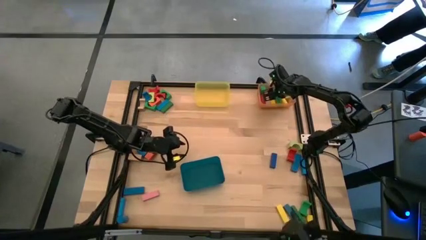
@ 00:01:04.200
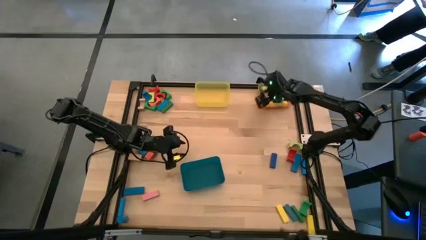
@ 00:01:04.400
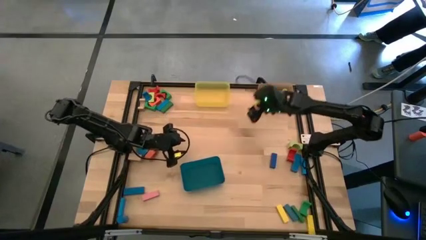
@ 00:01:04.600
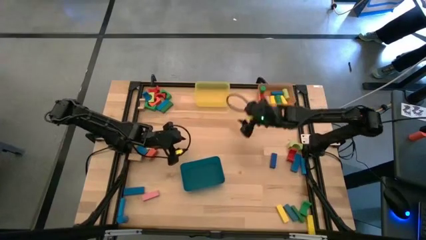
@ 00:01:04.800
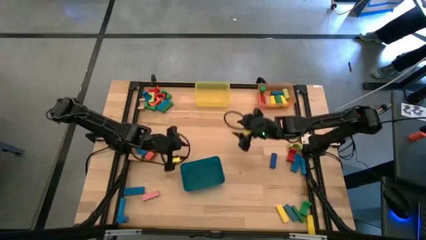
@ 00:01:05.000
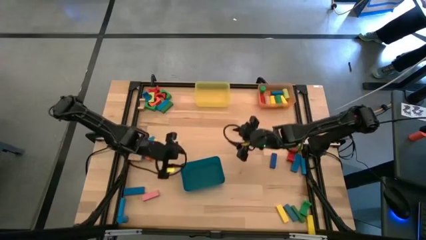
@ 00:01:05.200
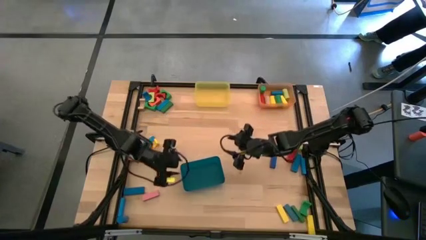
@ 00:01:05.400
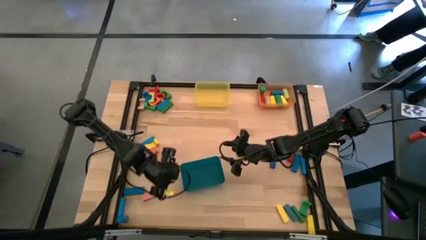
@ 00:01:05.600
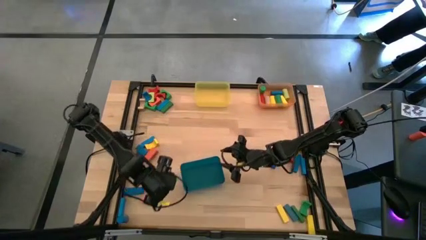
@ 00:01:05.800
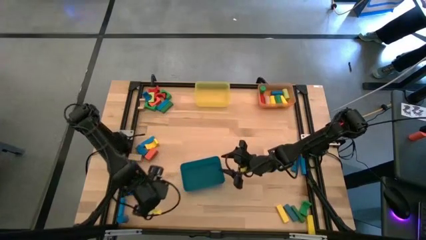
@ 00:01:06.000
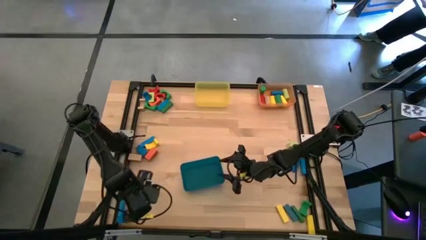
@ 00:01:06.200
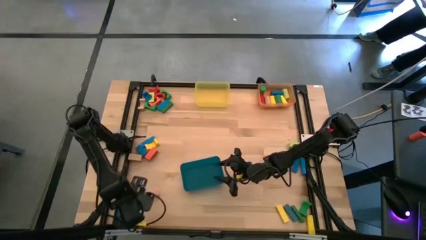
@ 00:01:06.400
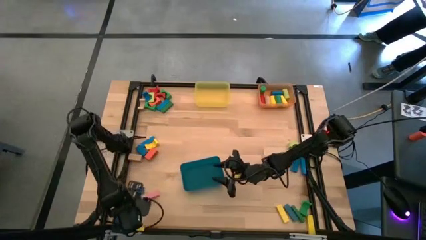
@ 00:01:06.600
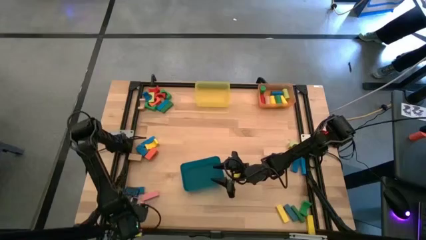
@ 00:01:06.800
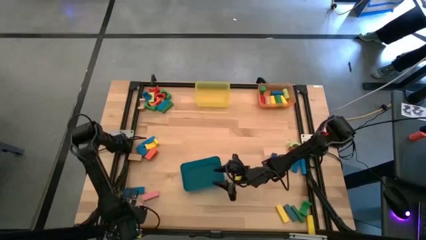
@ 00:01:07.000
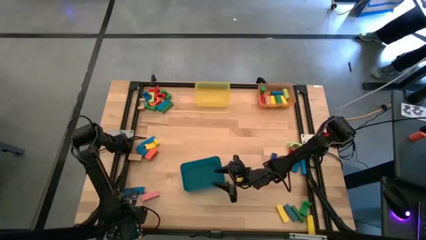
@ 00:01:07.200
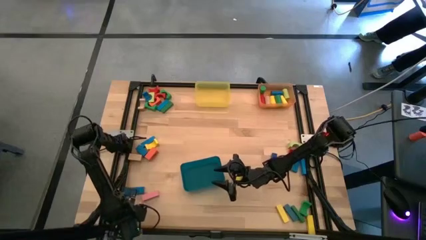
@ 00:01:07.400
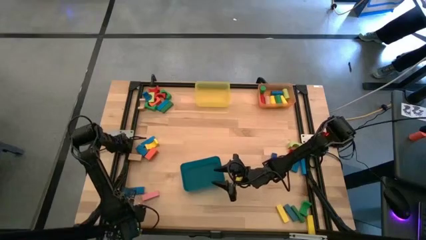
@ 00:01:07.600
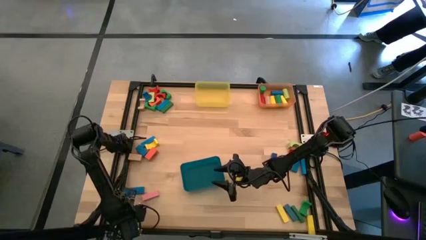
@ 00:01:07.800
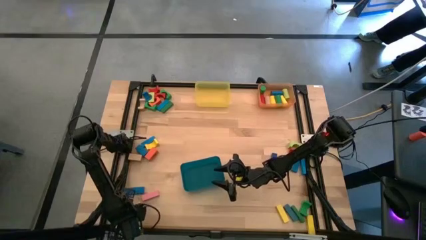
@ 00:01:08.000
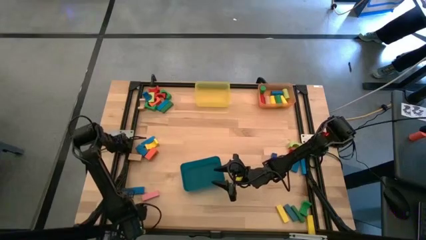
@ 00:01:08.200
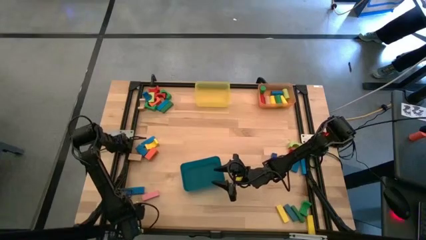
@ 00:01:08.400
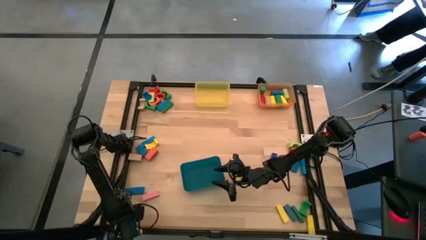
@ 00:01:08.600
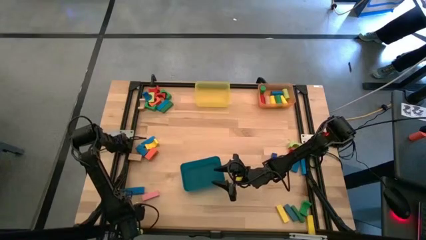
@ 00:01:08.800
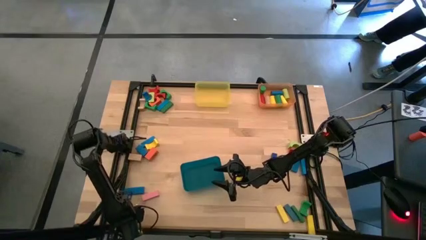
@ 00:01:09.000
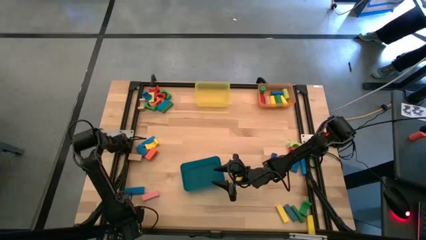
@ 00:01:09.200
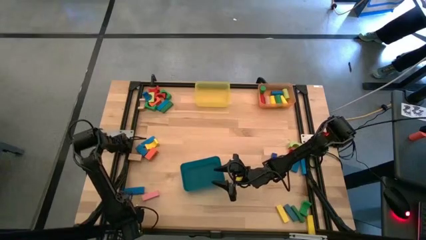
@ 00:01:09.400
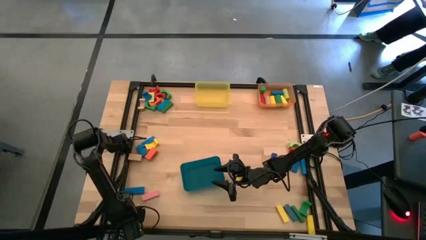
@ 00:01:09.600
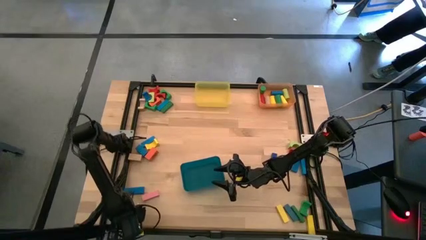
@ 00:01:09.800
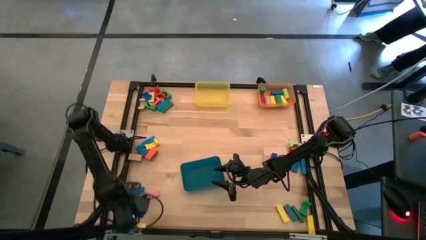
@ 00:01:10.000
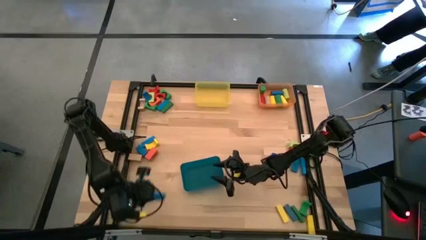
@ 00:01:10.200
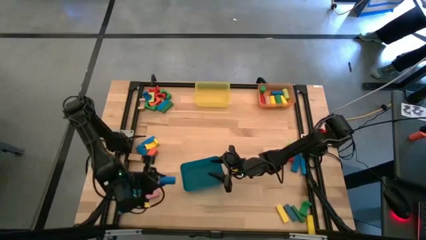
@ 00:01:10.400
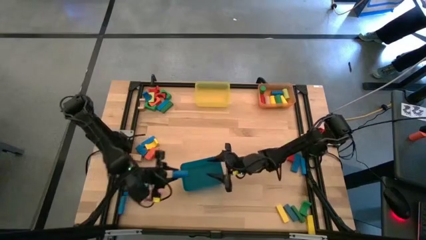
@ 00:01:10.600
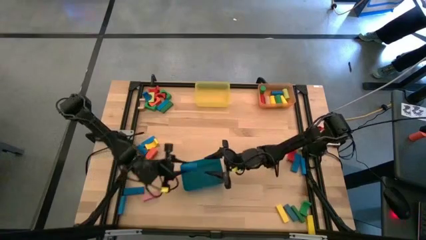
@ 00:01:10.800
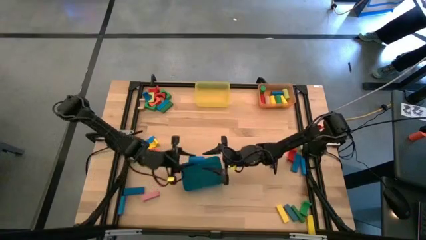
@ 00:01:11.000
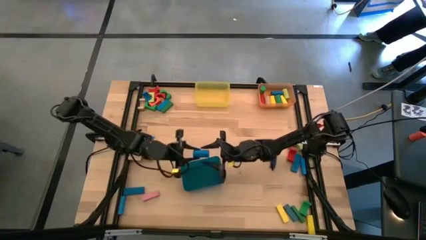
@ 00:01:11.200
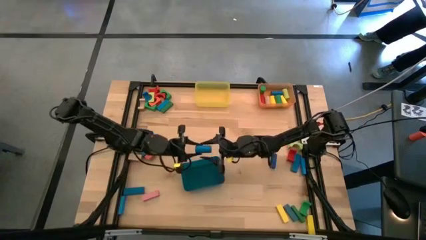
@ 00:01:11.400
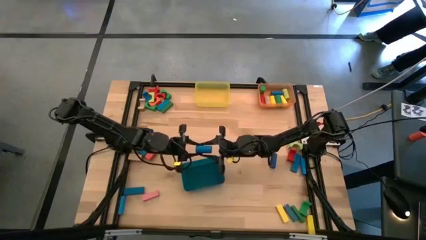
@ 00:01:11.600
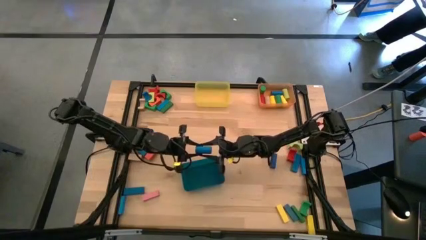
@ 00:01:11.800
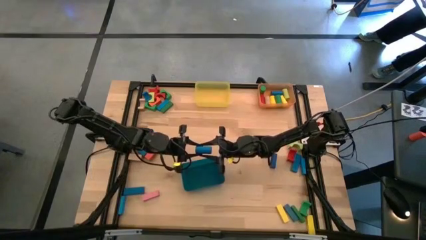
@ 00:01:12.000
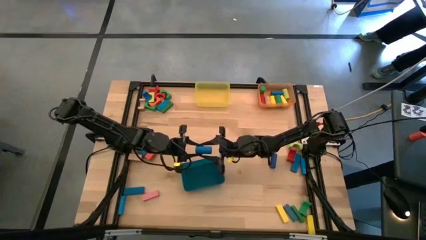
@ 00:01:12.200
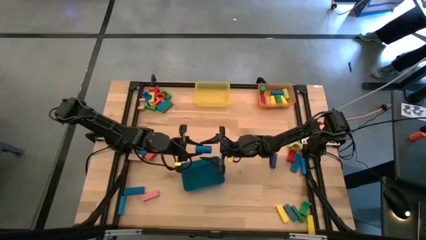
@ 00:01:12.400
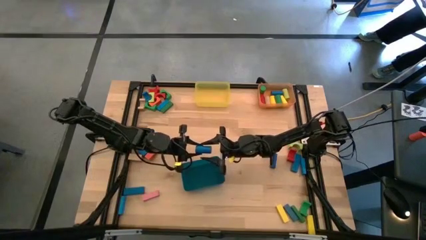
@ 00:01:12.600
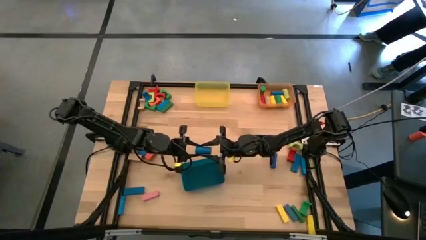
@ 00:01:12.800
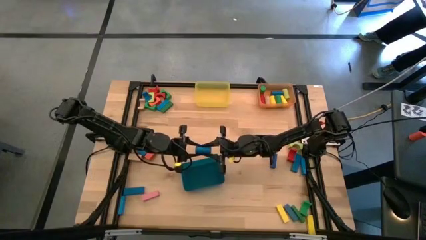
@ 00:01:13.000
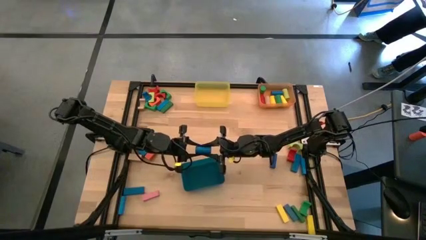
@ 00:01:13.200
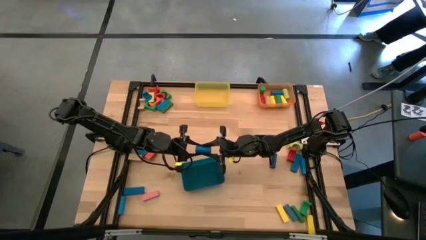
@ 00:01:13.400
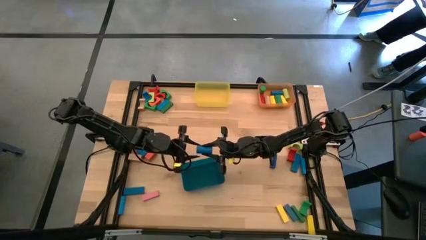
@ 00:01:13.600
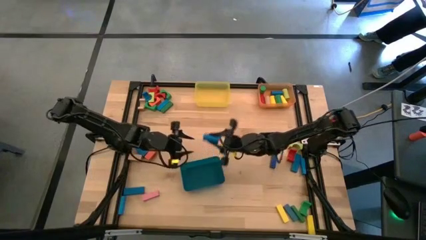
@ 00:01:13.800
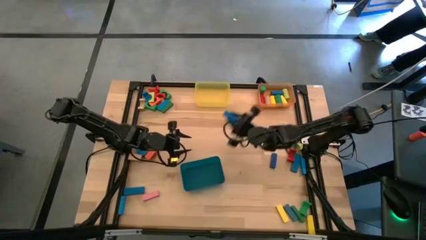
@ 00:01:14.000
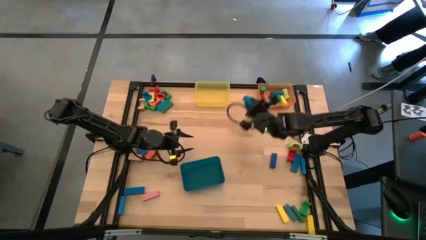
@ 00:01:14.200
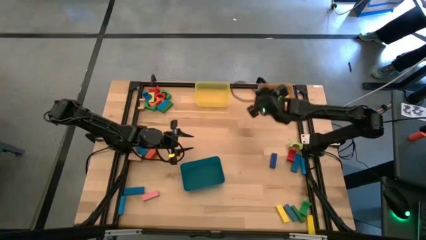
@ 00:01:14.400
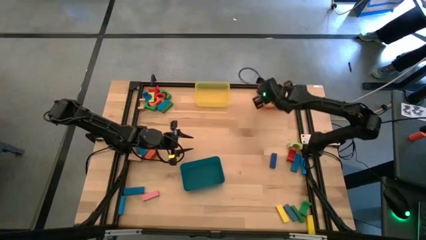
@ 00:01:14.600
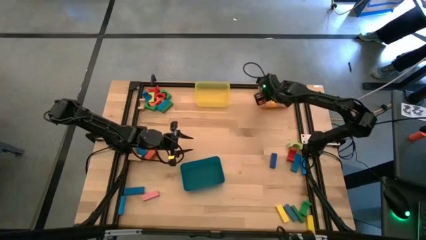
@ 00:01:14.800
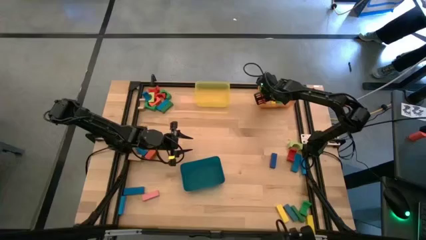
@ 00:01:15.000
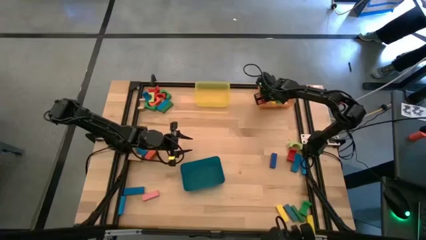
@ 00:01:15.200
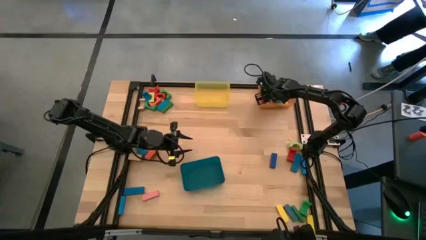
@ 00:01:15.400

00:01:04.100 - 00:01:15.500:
Task: Sort blocks by size
Put the blue cylindrical block into the orange bin

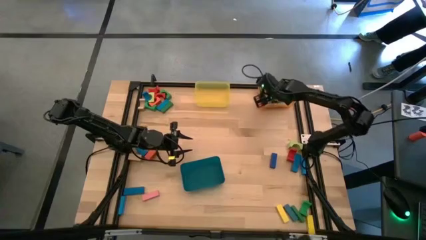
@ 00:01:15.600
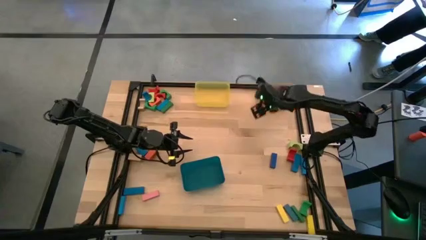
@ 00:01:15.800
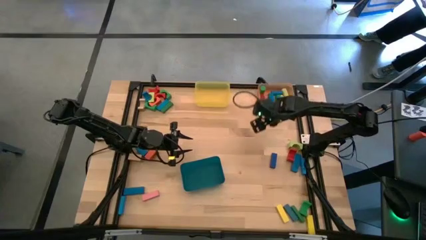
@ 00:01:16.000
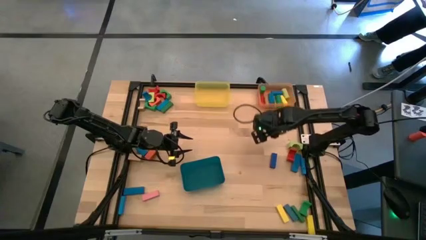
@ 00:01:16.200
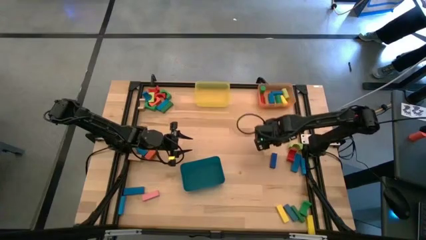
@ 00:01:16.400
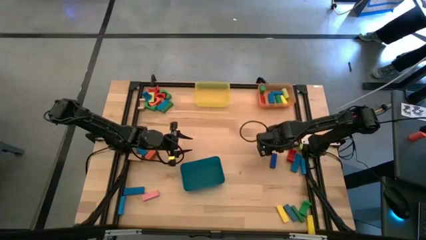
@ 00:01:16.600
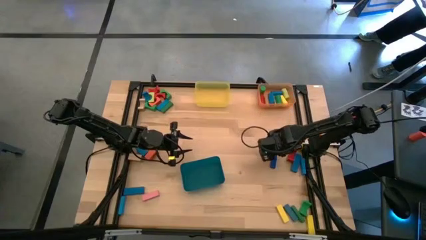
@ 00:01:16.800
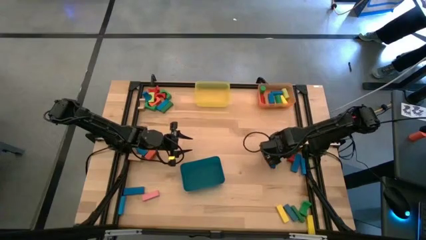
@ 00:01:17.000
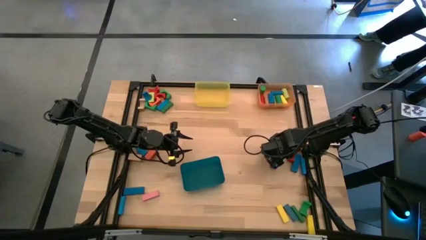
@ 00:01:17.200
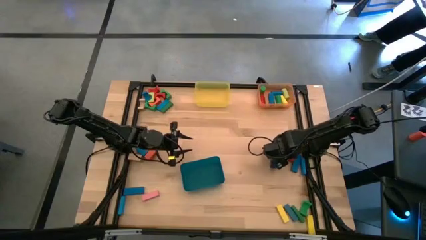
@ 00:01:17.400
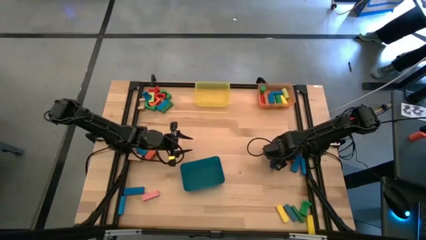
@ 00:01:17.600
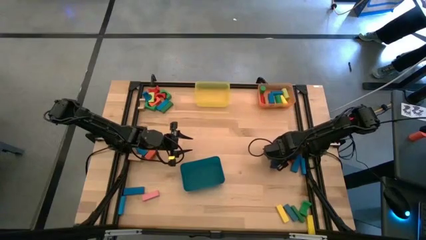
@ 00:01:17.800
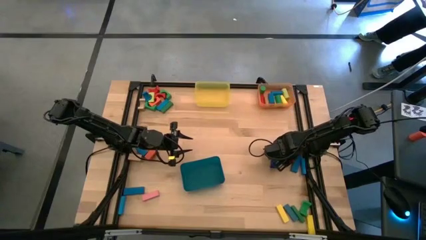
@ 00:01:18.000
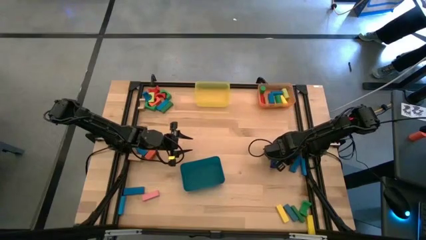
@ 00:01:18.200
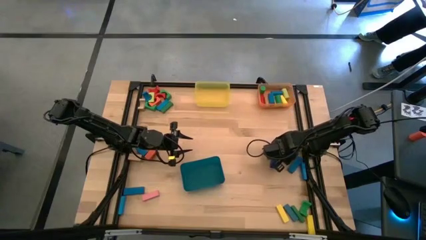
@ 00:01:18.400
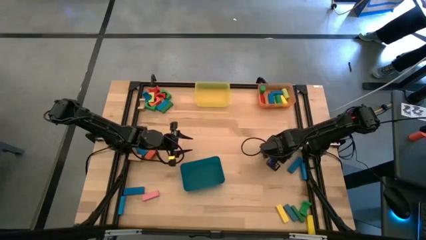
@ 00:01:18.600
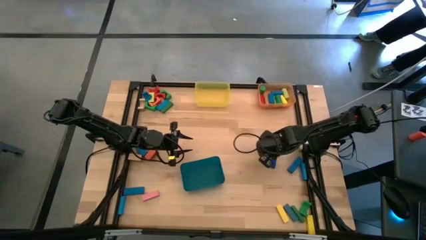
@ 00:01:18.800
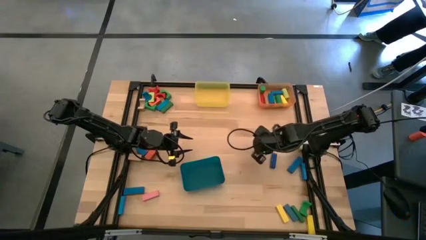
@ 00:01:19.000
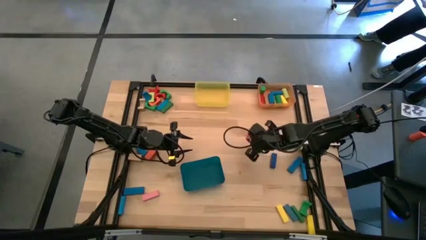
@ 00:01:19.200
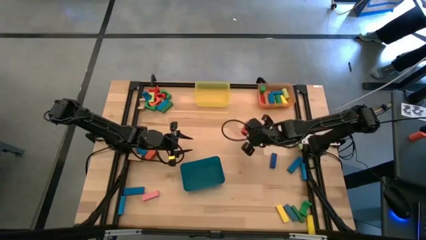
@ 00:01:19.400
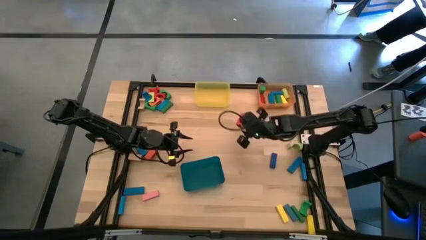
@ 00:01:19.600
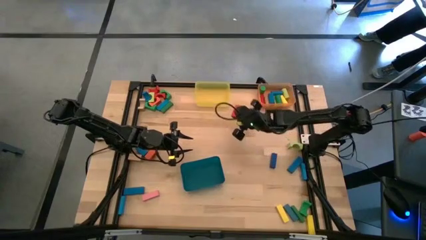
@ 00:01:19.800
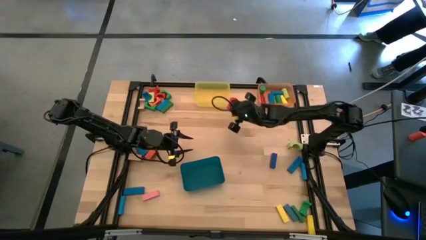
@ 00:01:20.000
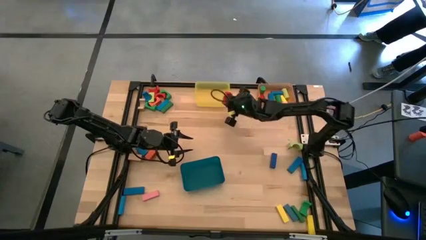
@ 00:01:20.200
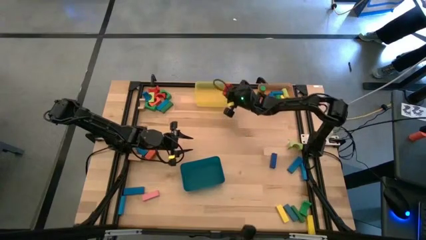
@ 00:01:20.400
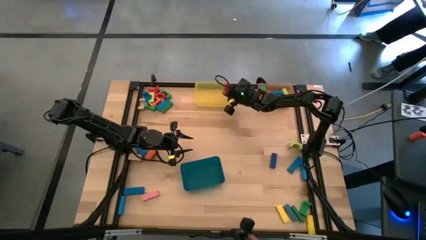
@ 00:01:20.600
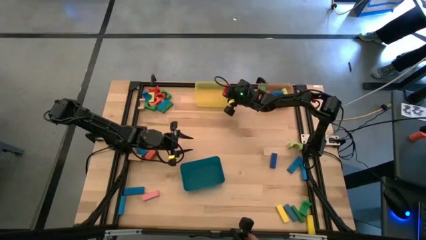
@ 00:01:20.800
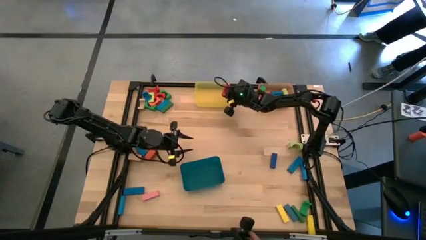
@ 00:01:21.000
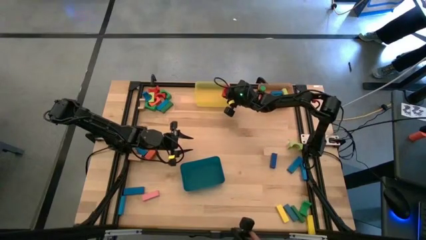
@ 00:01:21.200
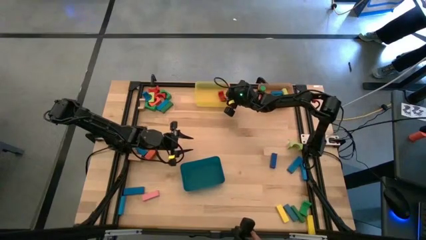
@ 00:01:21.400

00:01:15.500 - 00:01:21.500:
Put the red arch block into the yellow bin
